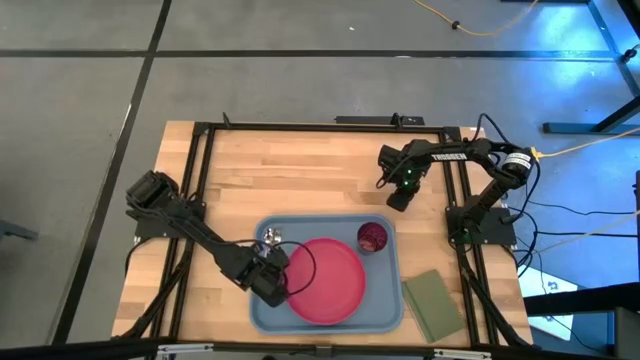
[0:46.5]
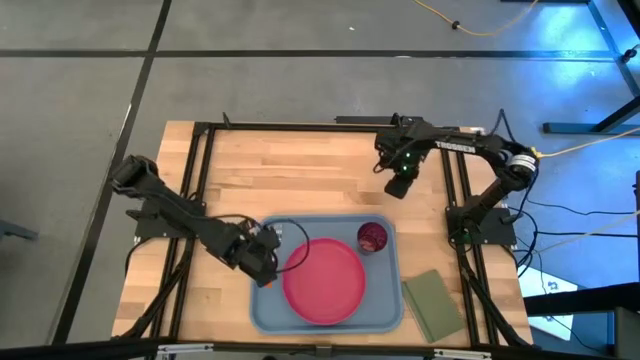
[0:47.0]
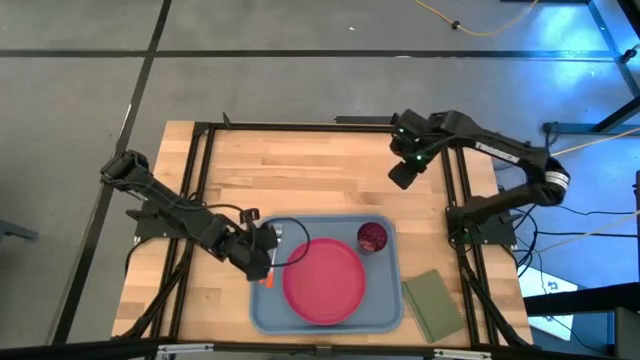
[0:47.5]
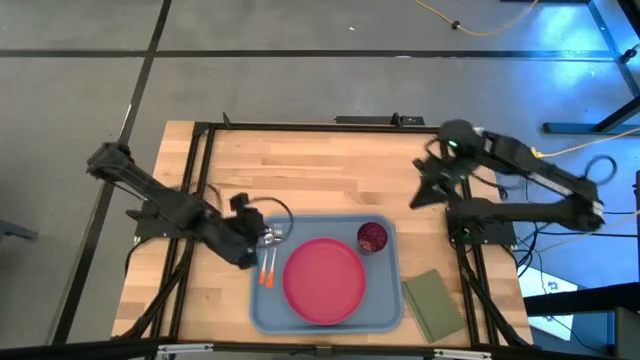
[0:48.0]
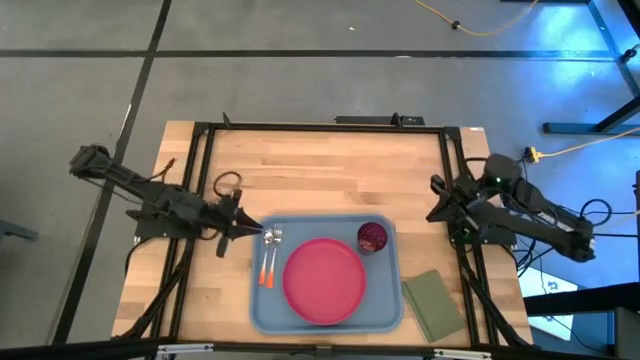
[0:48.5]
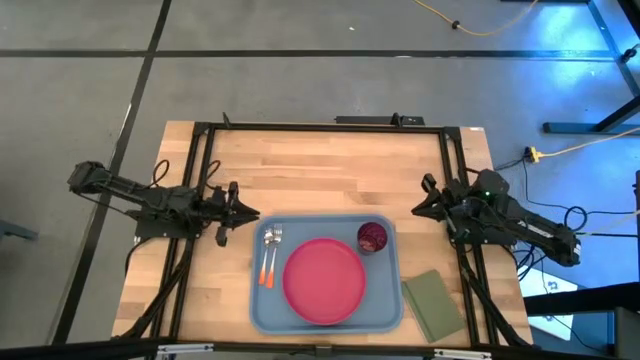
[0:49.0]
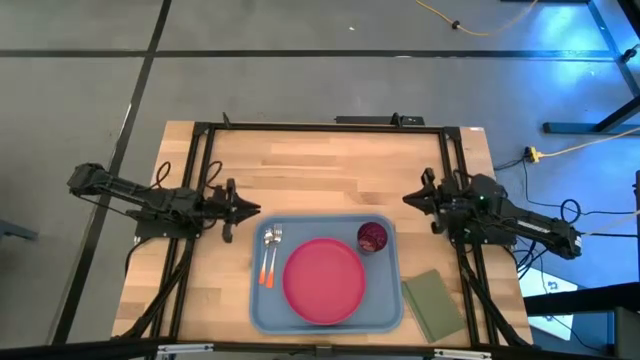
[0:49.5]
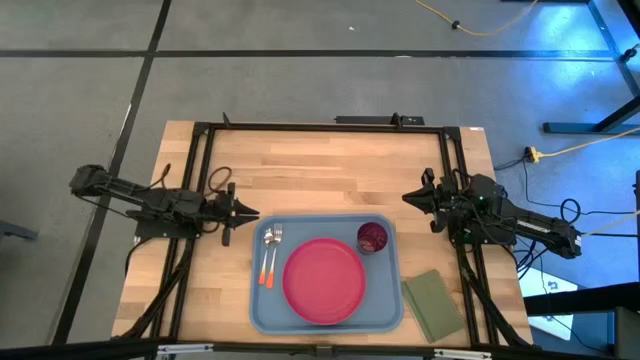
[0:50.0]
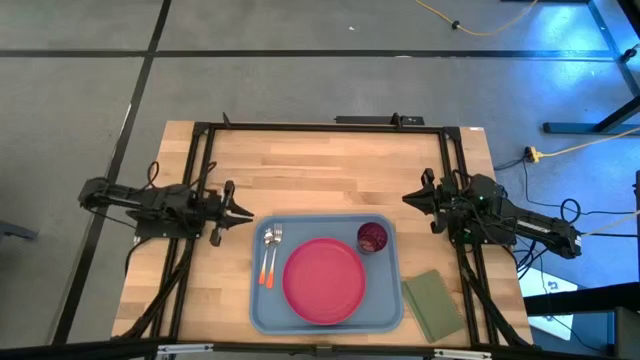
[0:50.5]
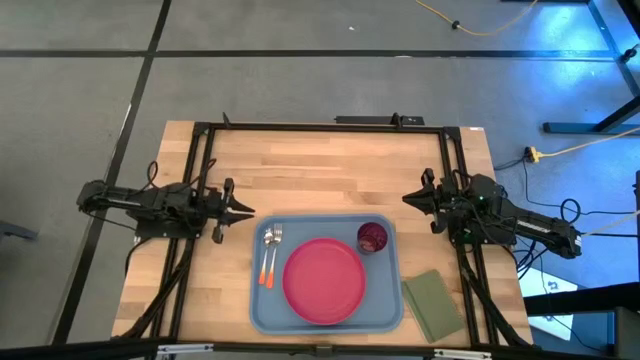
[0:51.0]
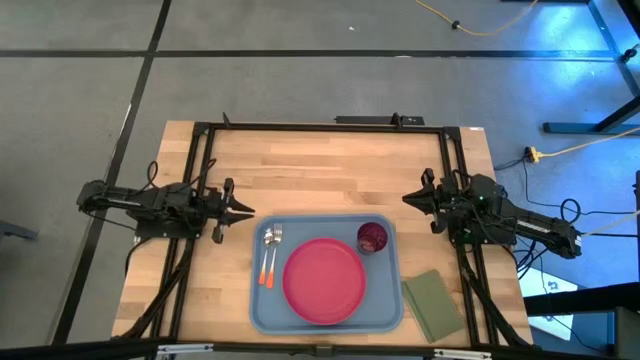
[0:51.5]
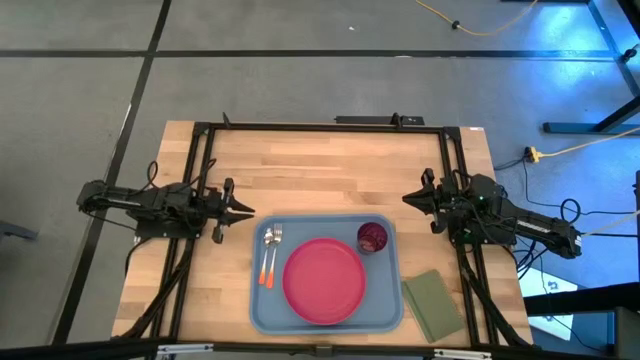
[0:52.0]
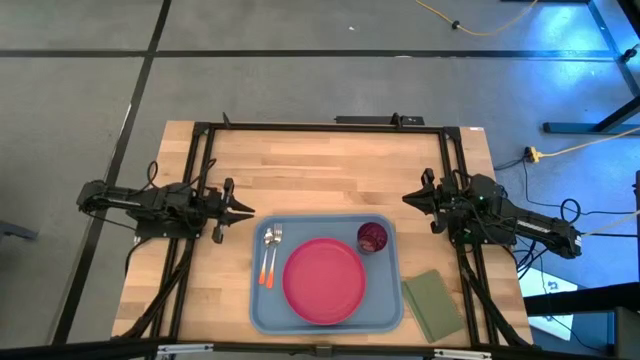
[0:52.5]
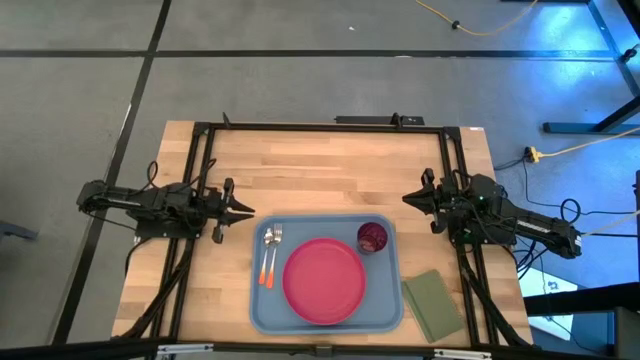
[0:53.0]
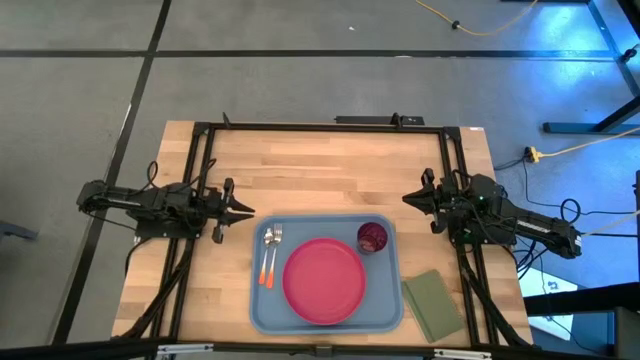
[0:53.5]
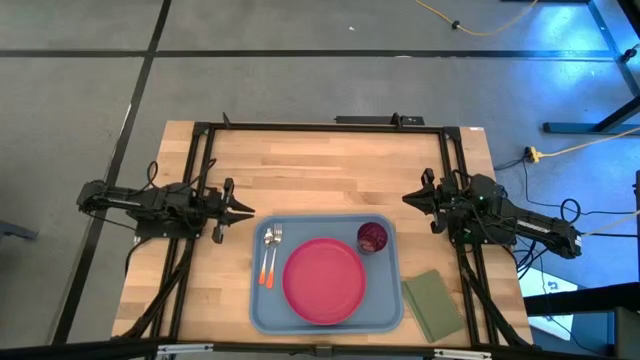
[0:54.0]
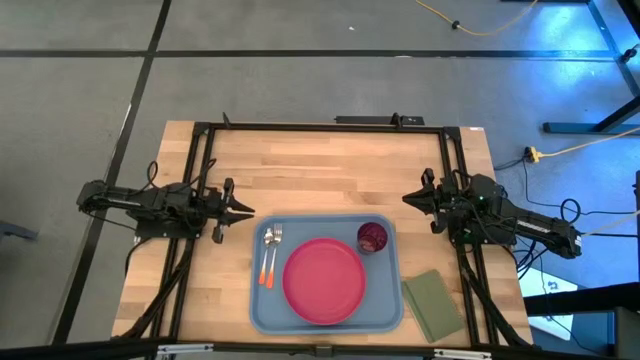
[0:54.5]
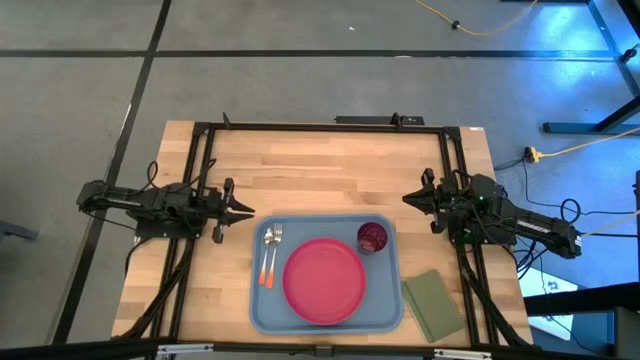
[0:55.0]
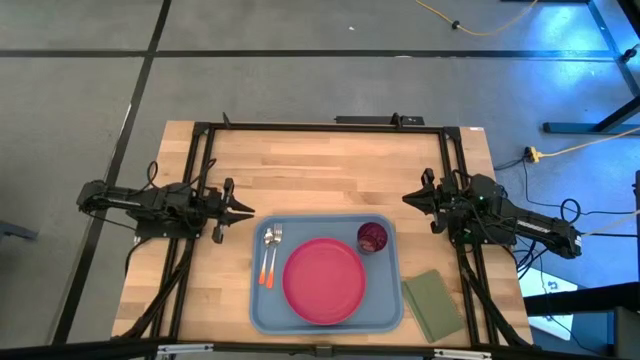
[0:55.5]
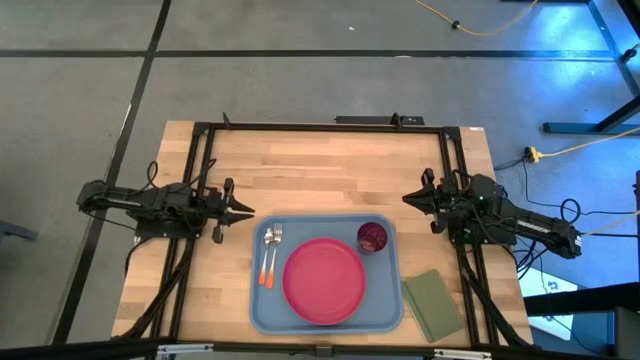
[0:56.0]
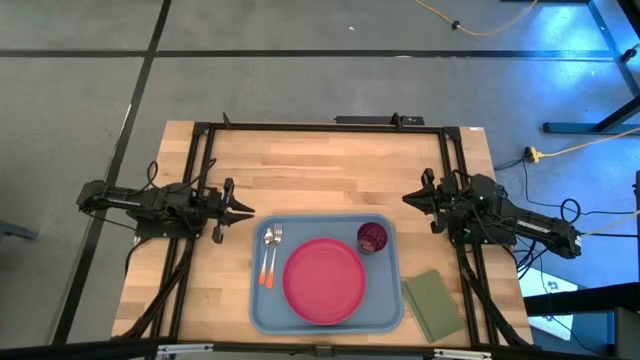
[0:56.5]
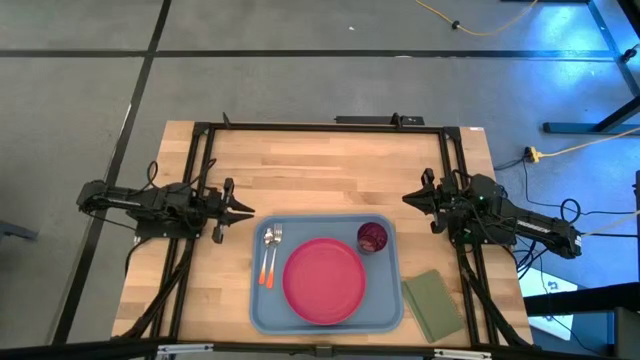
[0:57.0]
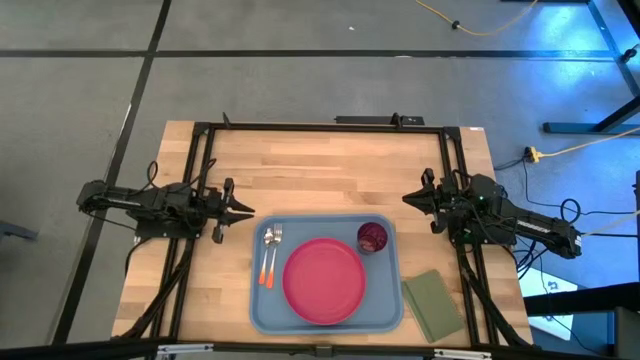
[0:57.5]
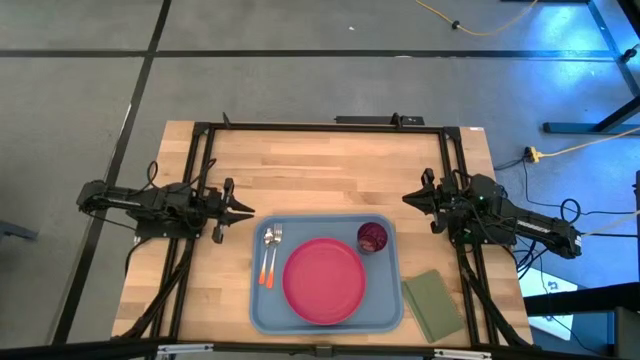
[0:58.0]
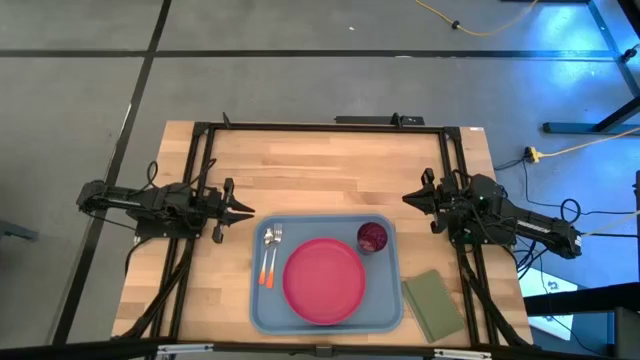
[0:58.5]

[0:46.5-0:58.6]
Task: Pick and place plate/cup/fork/spoon on tray
Return to Home Position

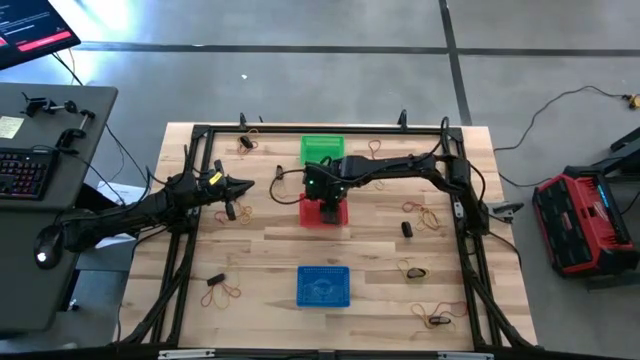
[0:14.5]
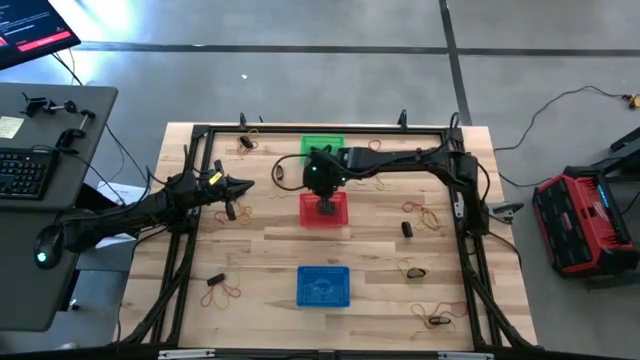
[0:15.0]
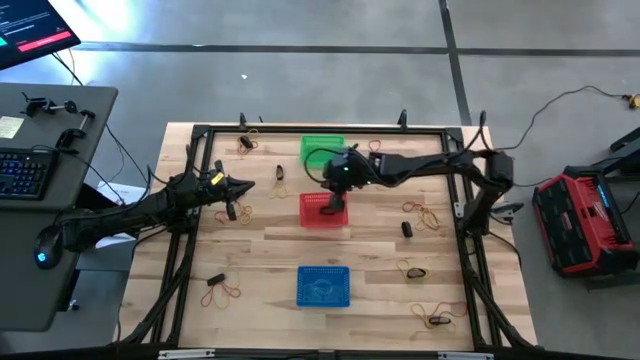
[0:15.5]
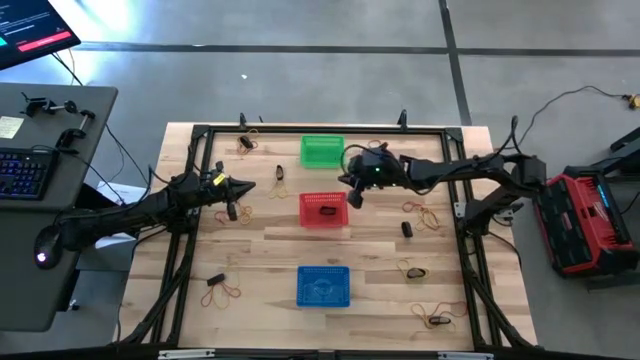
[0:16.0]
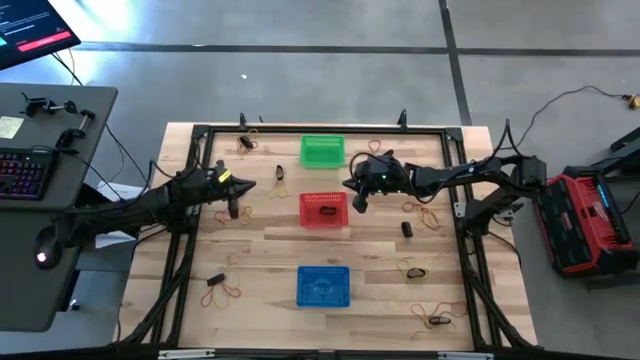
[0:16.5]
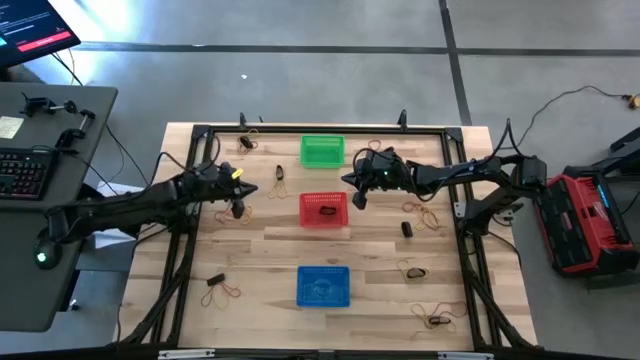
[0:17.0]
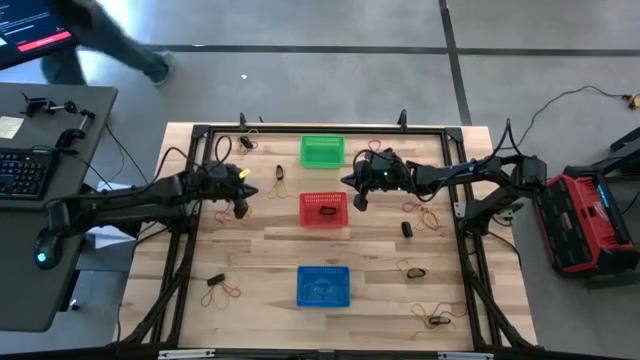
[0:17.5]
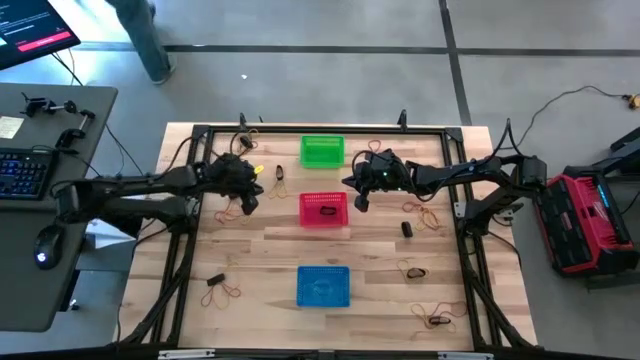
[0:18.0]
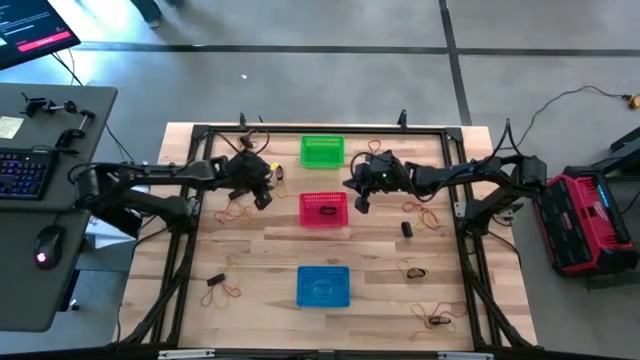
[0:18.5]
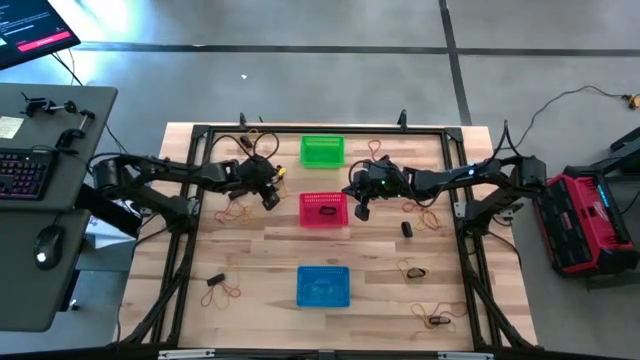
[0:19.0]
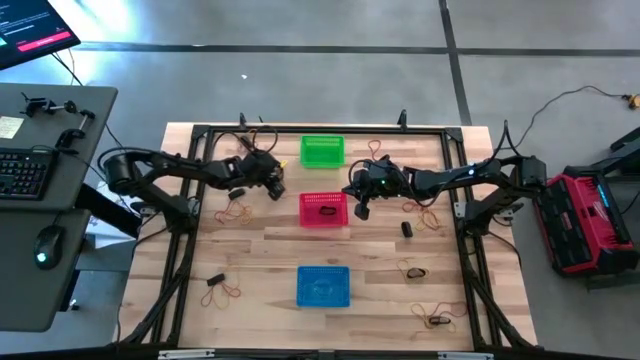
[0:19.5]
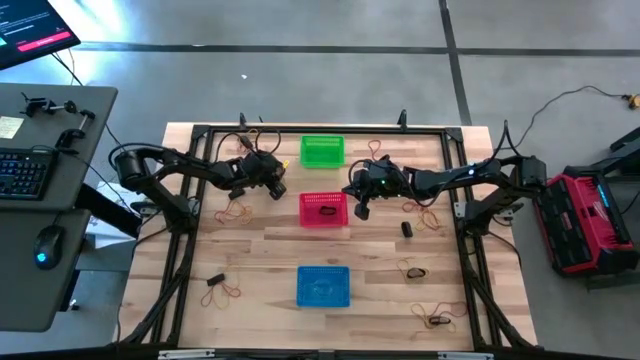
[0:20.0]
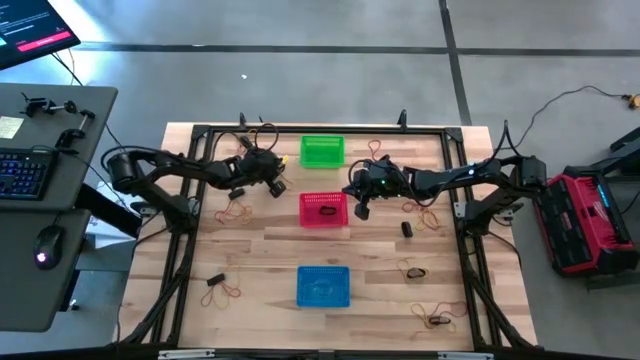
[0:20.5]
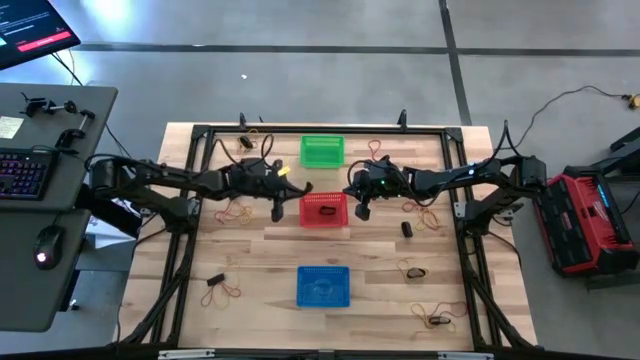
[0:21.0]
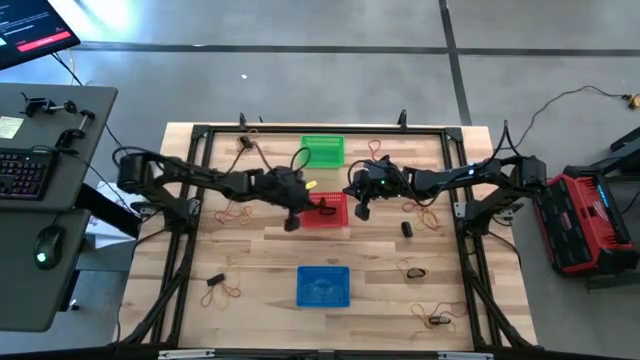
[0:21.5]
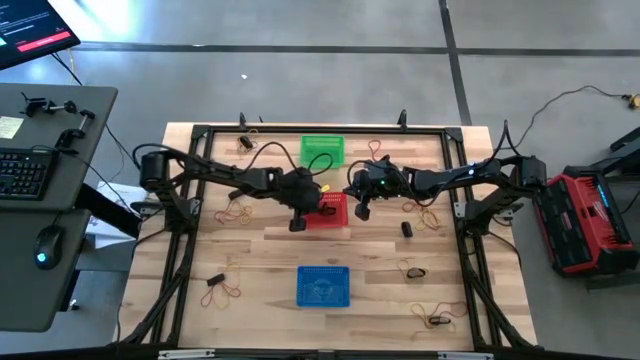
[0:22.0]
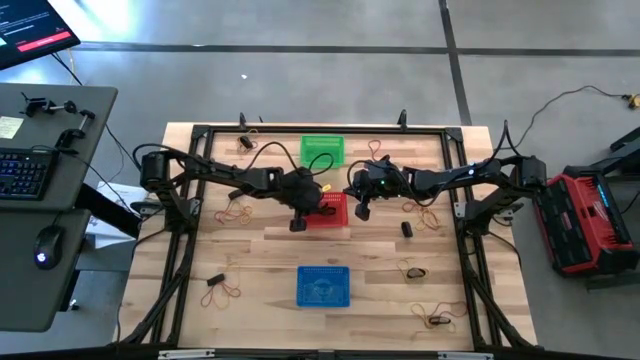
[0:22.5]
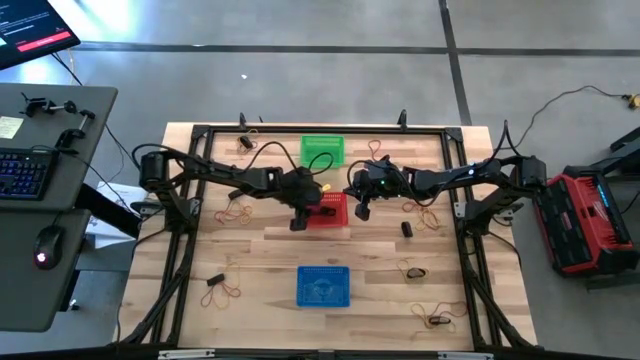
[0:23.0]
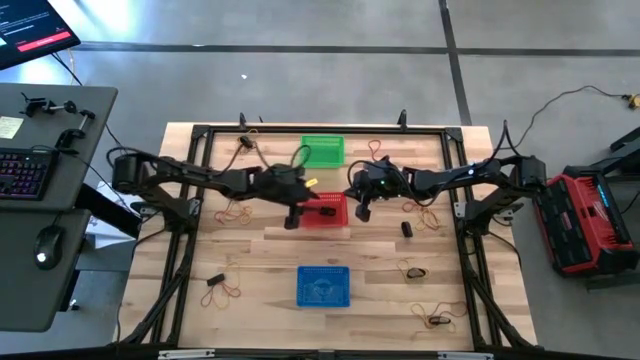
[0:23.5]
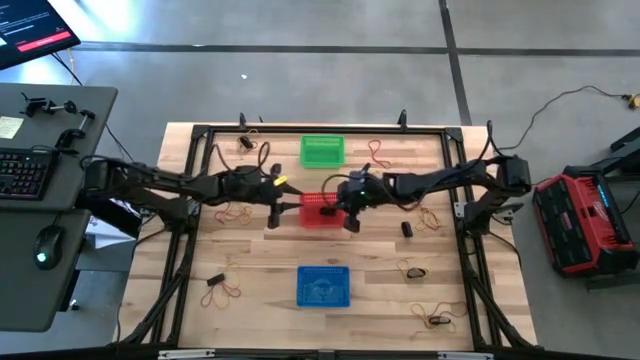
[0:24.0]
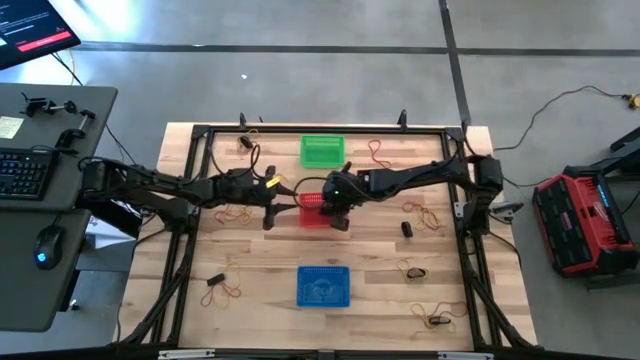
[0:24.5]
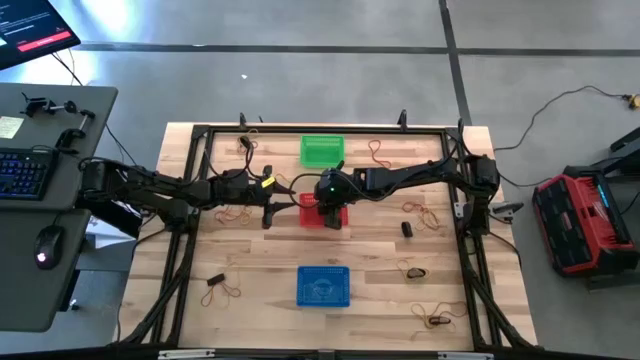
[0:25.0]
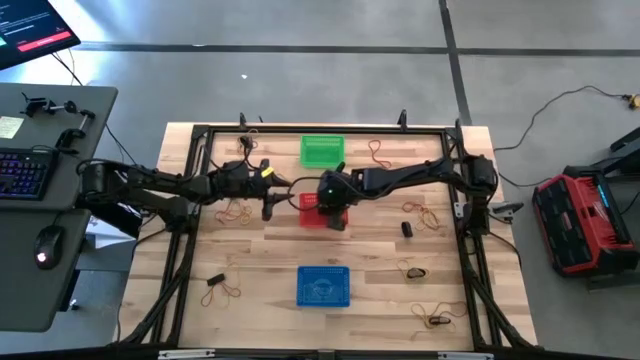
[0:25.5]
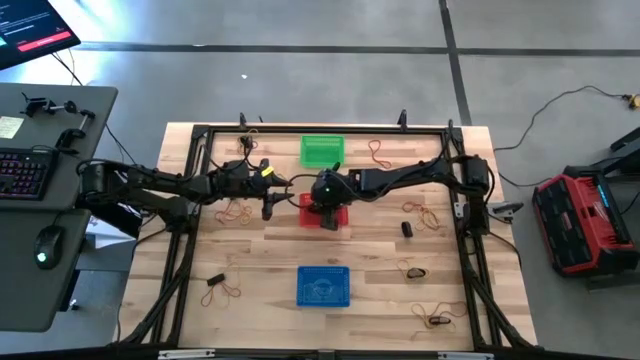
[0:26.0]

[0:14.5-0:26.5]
Task: Sort rubber bands into baskets
Put the black rubber band into the red bin
